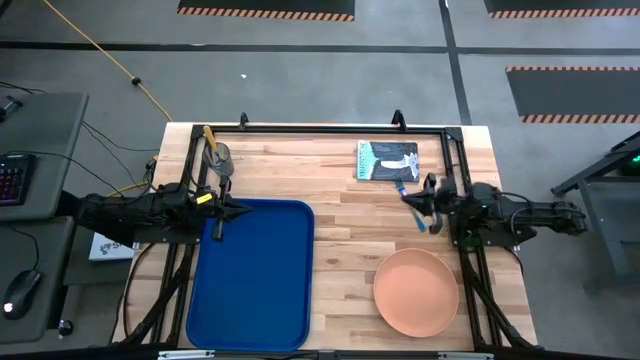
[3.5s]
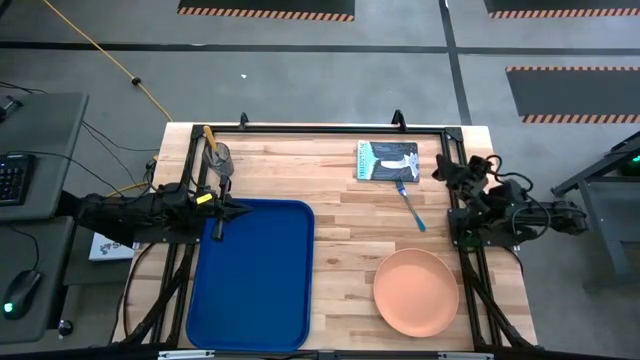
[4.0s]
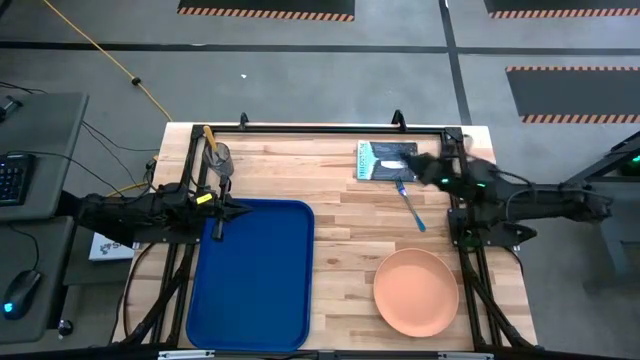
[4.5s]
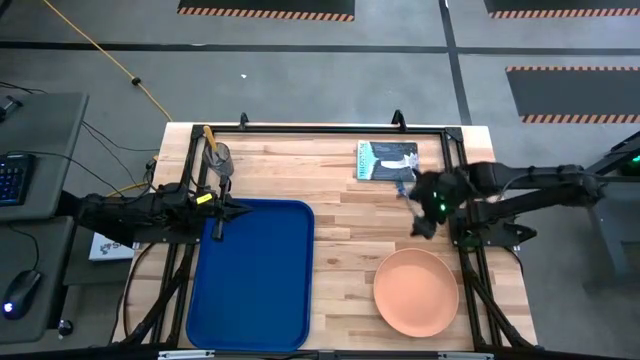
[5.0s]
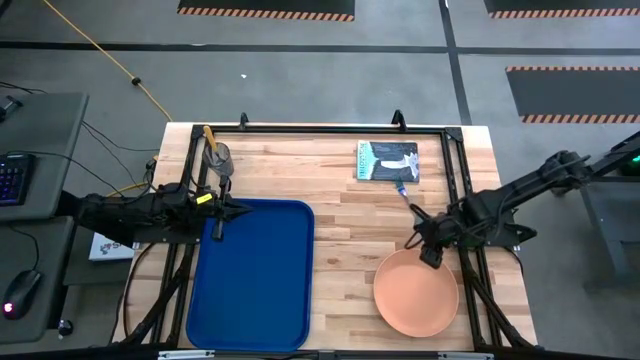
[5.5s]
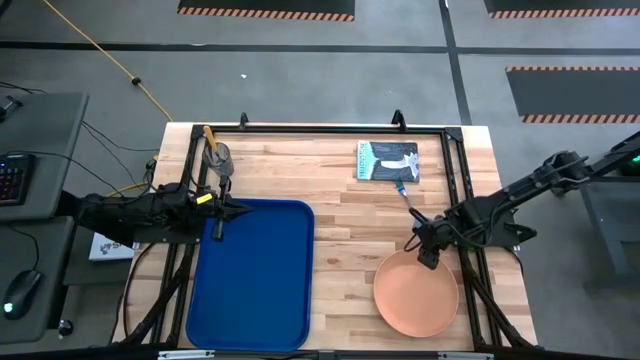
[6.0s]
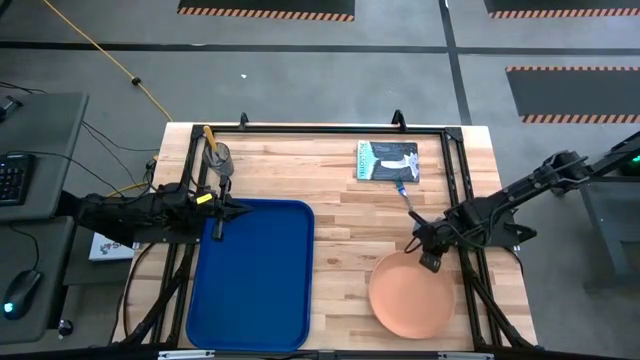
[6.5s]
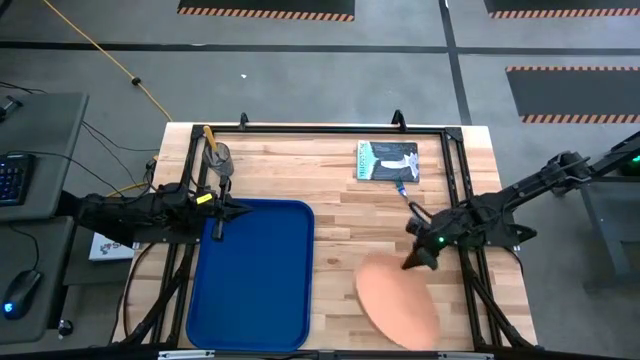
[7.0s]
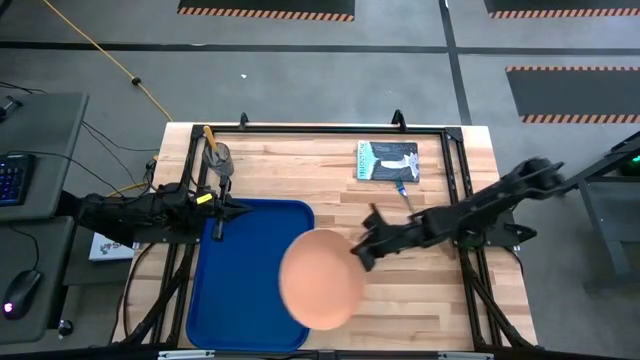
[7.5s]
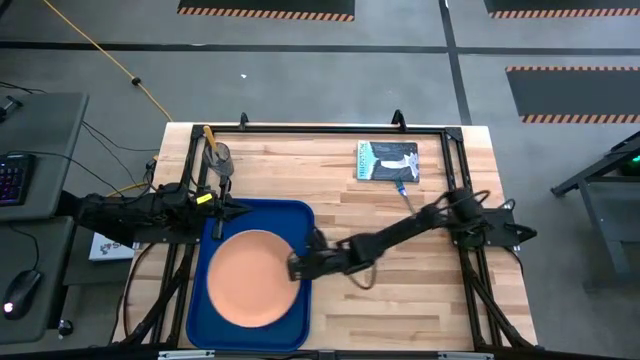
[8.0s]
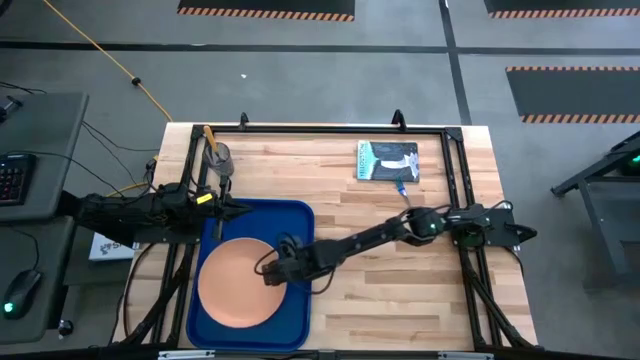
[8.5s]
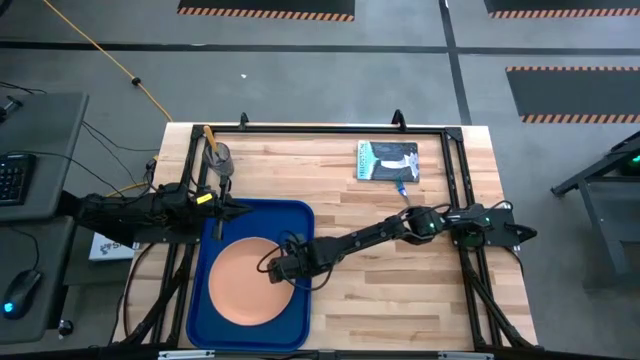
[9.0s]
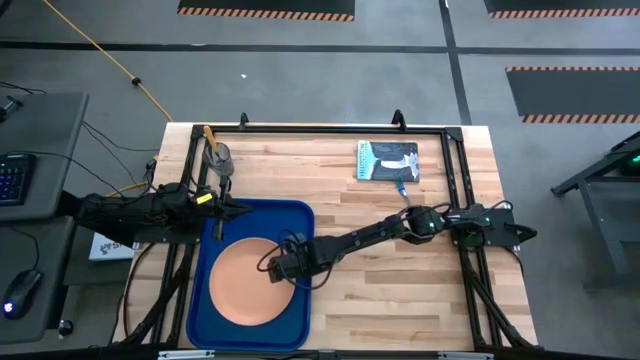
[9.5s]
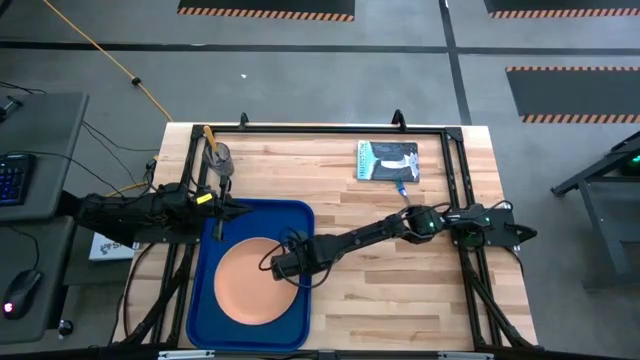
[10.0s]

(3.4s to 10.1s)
Task: Pick and place plate/cup/fork/spoon on tray
Put the light orange plate on the blue tray

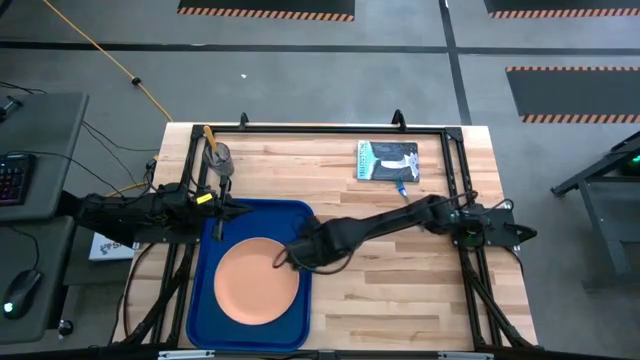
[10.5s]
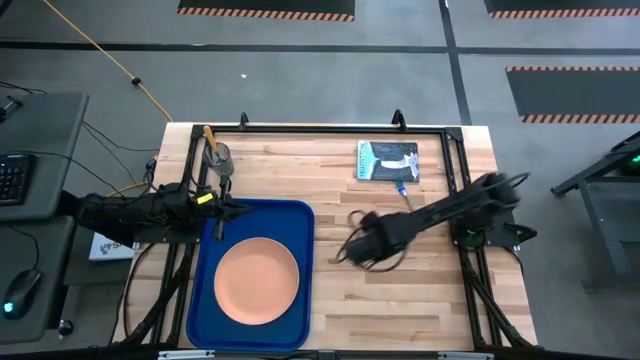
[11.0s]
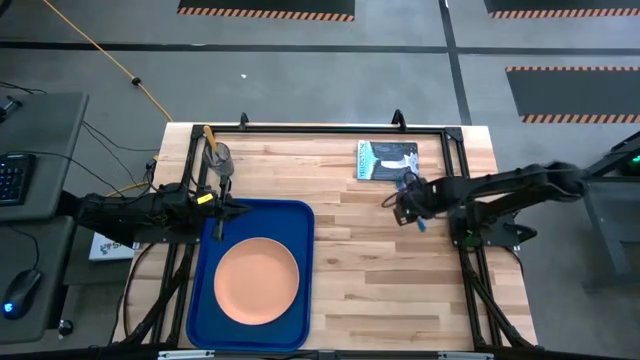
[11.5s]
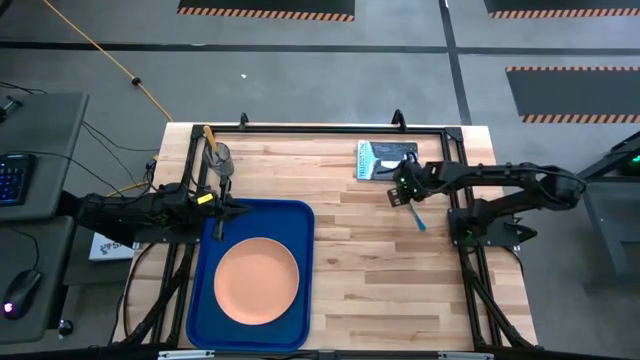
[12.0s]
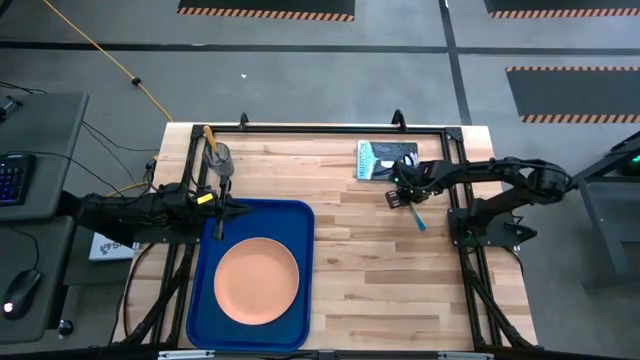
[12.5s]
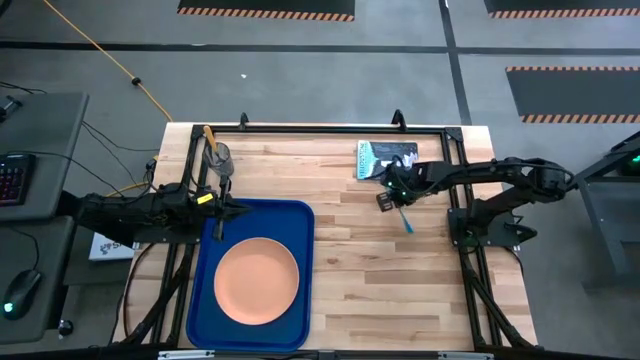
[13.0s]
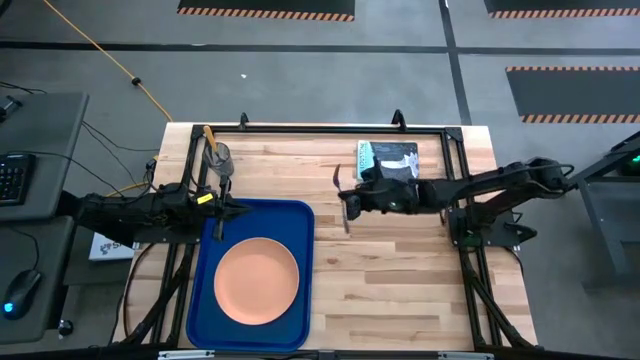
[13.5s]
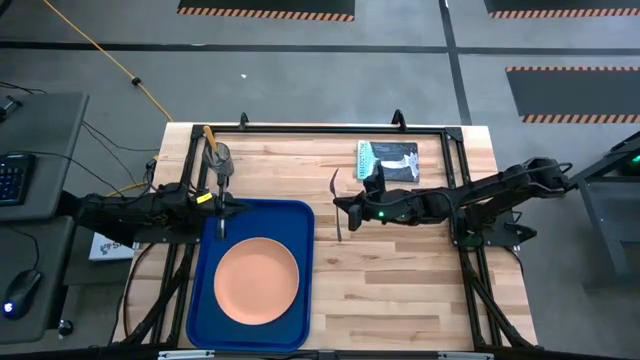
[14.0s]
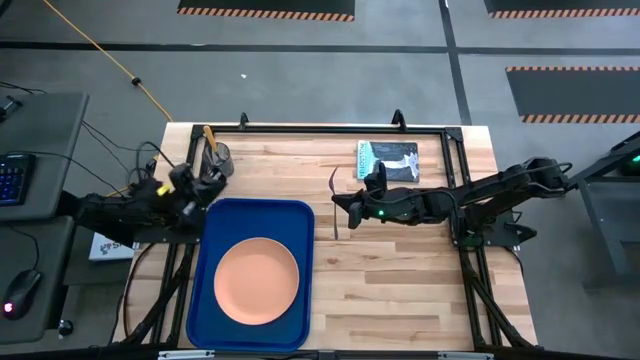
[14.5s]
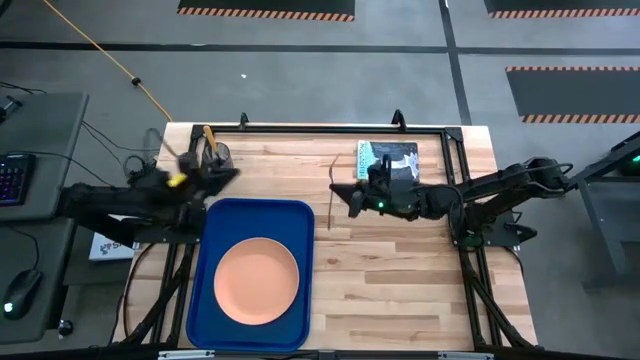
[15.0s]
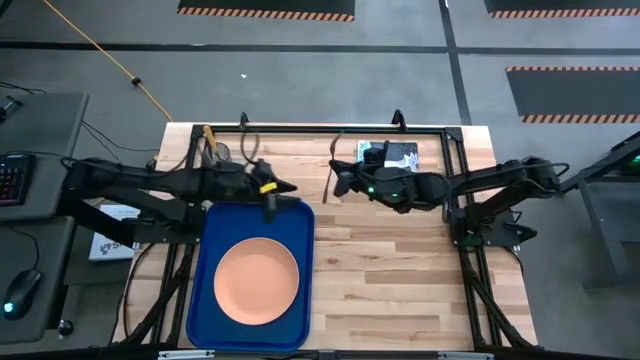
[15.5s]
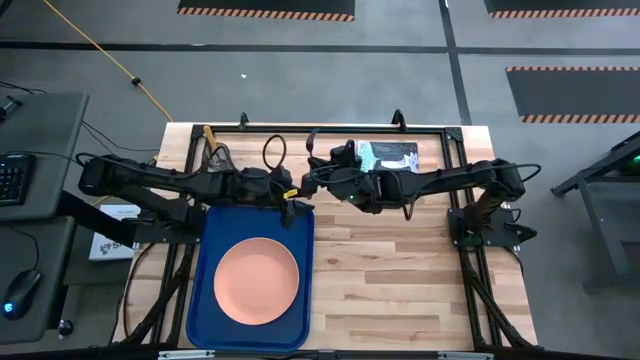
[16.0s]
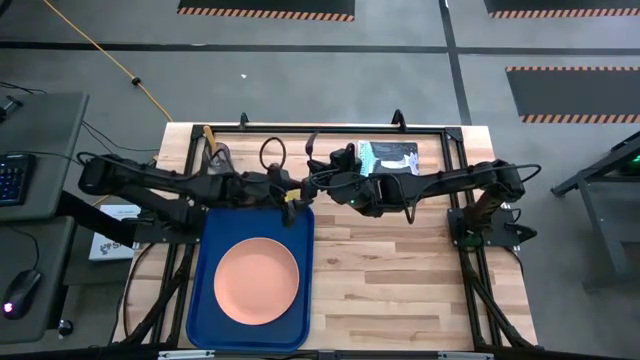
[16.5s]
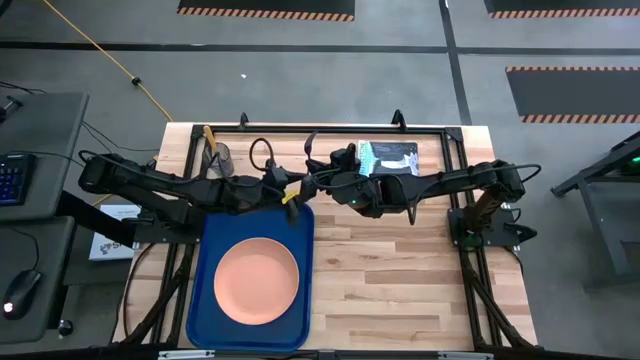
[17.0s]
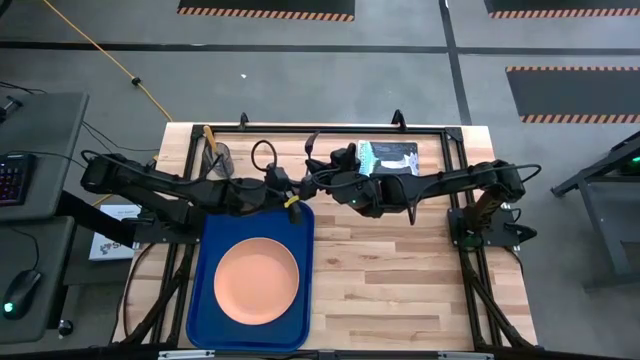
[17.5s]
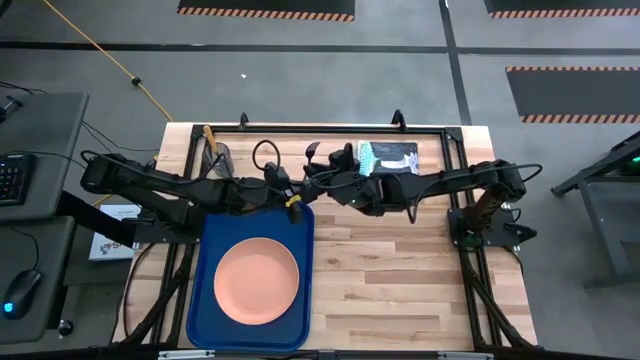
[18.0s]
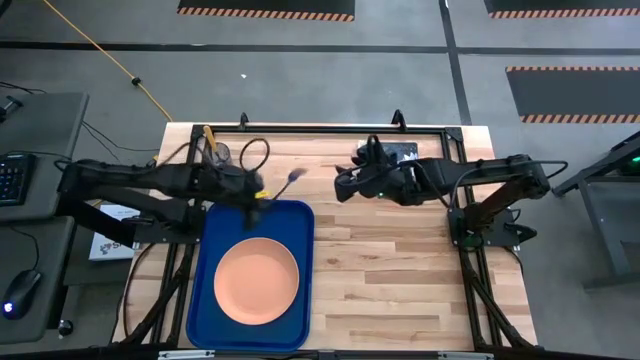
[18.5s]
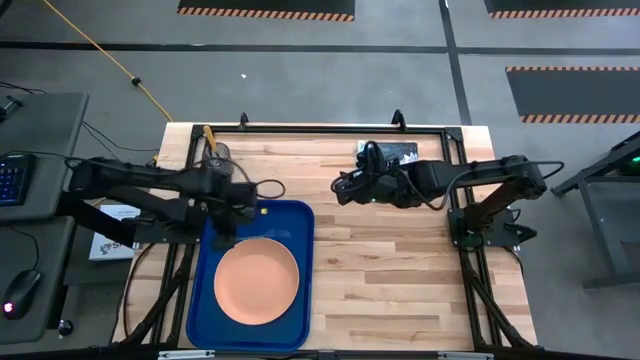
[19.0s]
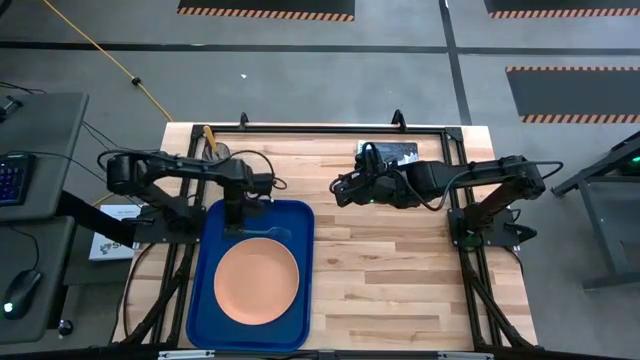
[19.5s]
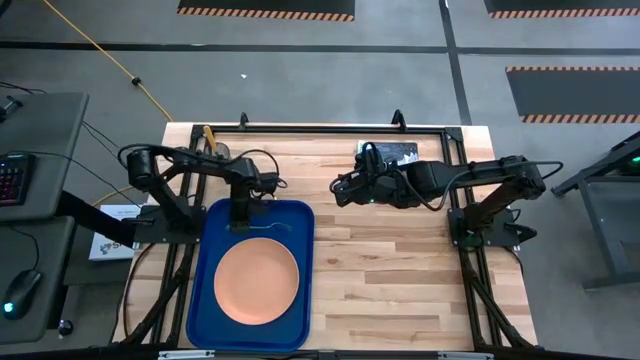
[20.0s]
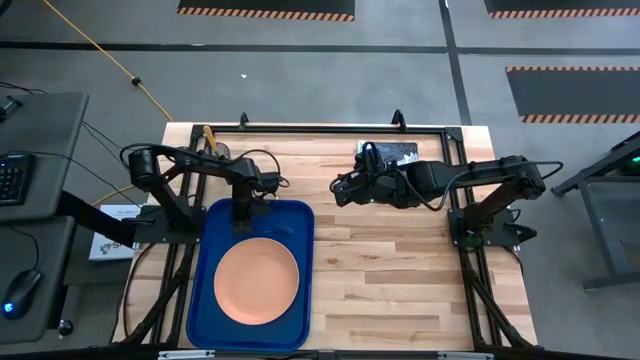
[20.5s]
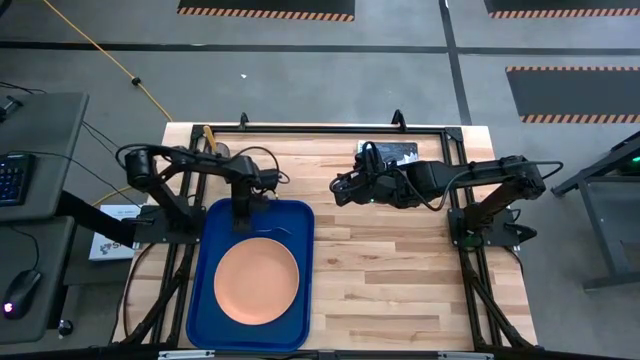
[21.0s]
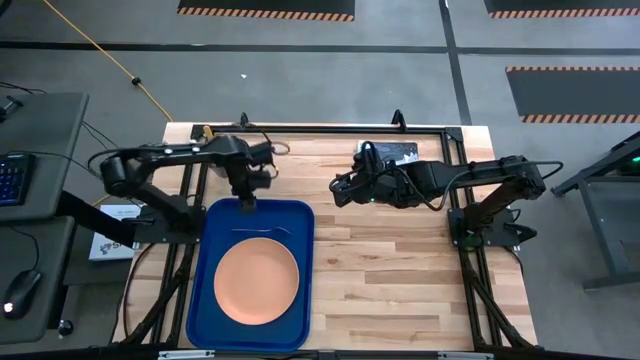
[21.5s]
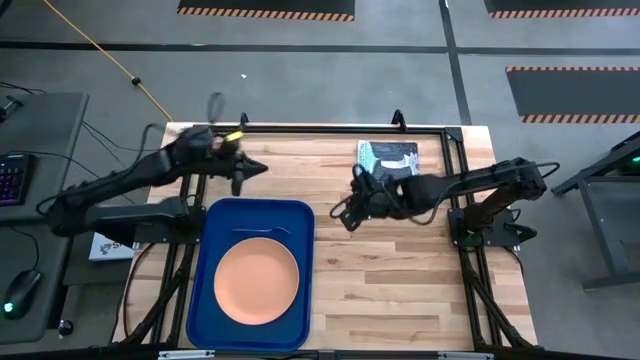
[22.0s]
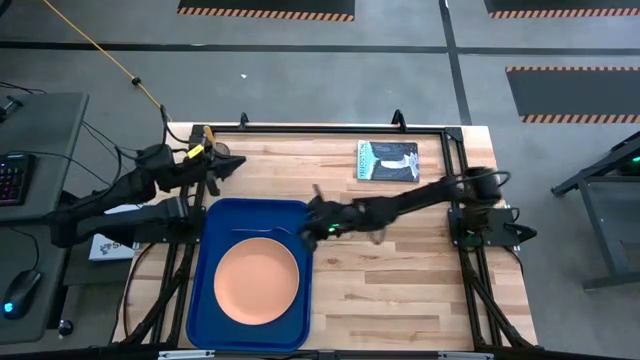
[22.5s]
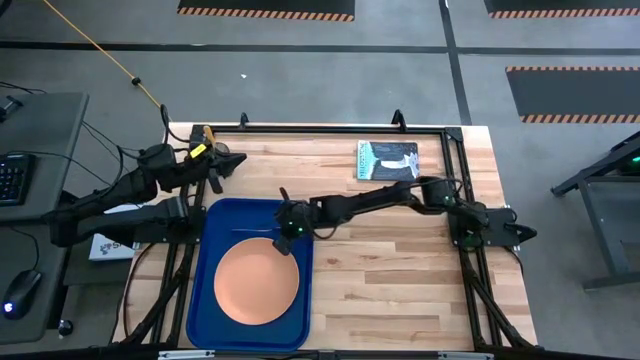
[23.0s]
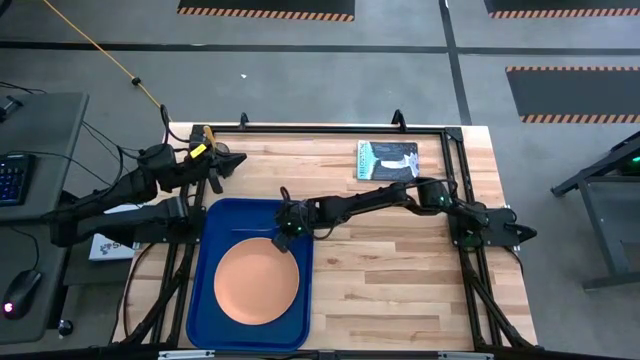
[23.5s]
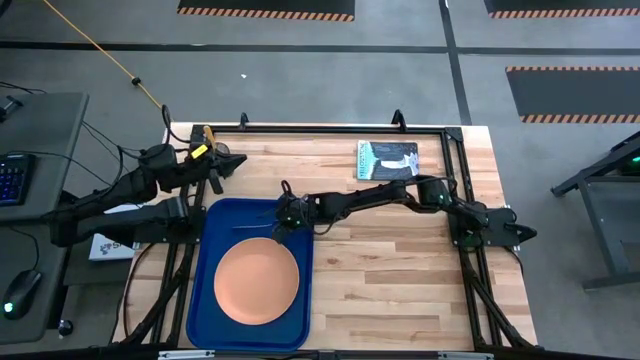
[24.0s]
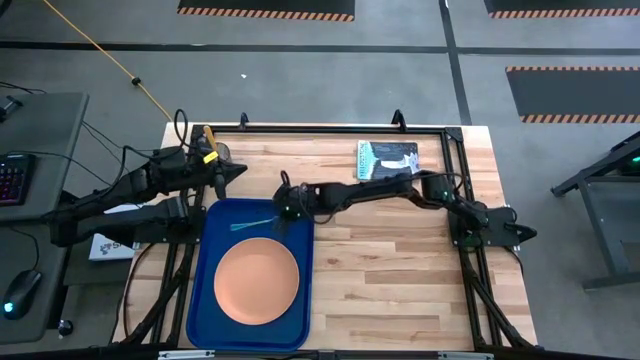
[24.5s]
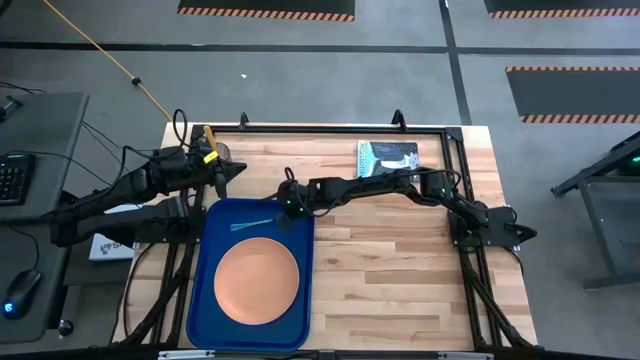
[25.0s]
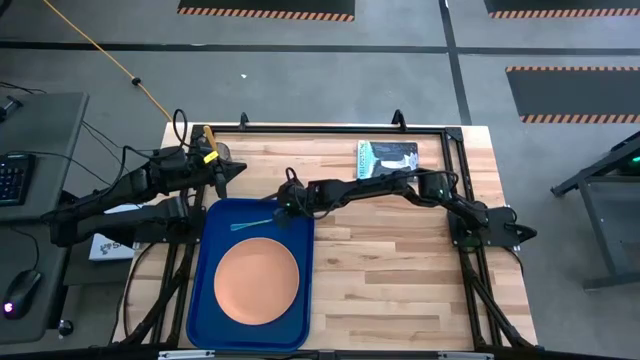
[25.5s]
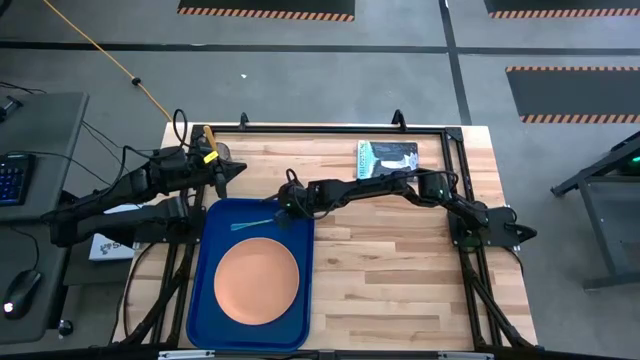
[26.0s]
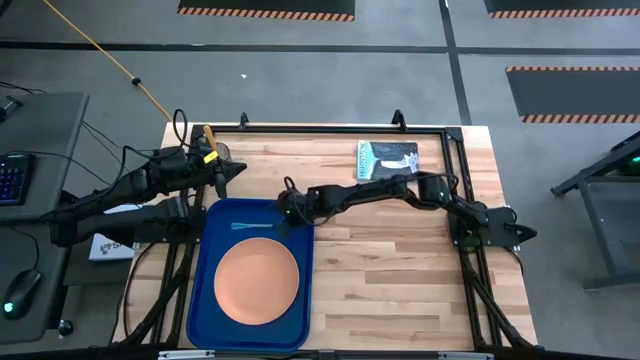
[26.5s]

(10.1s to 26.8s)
Put the blue fork on the blue tray to the left of the light orange plate
